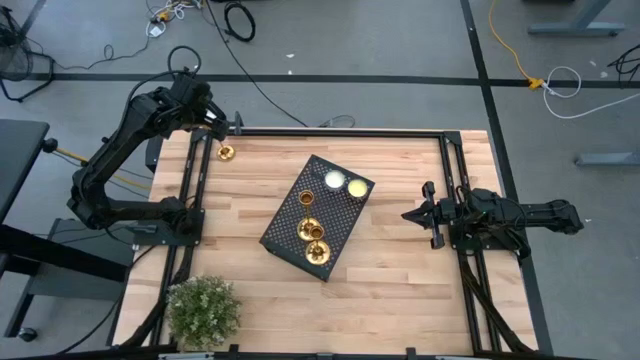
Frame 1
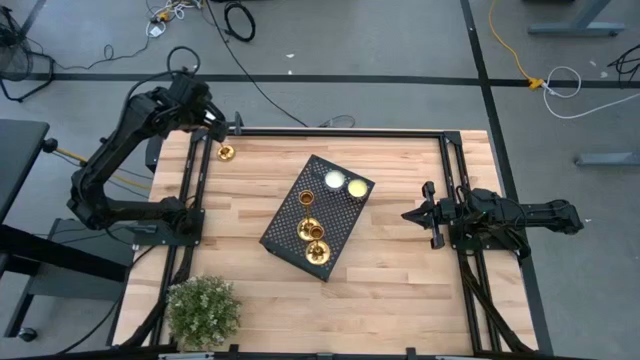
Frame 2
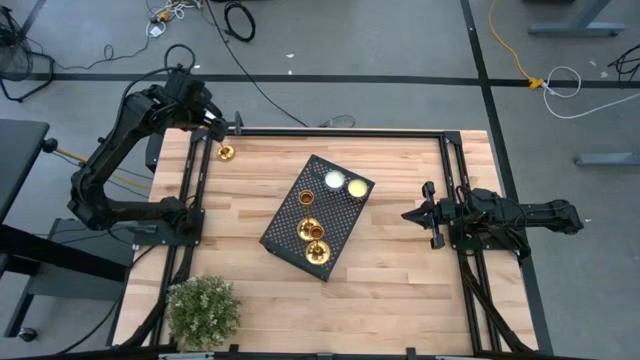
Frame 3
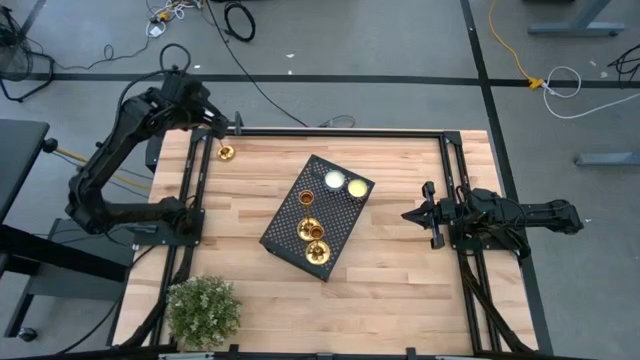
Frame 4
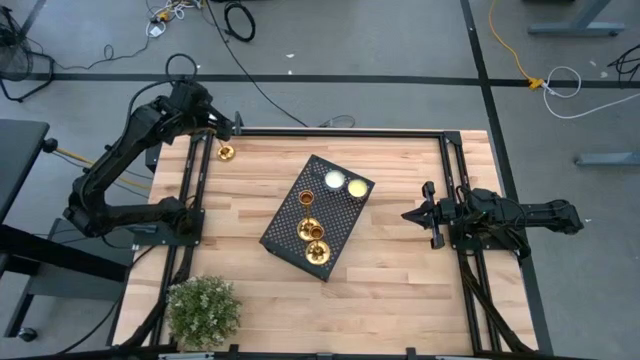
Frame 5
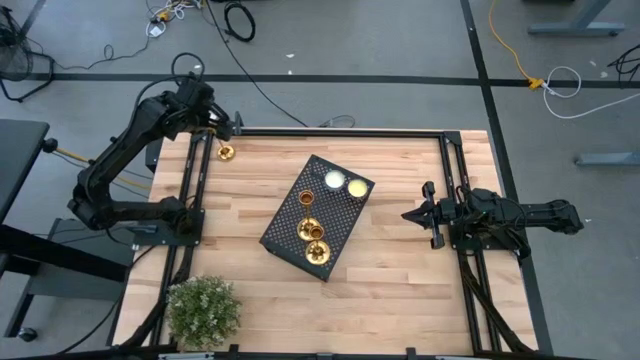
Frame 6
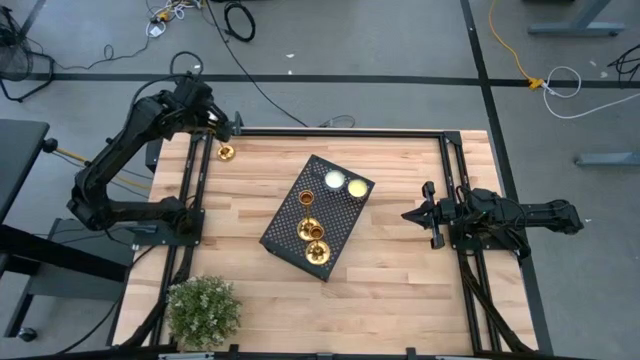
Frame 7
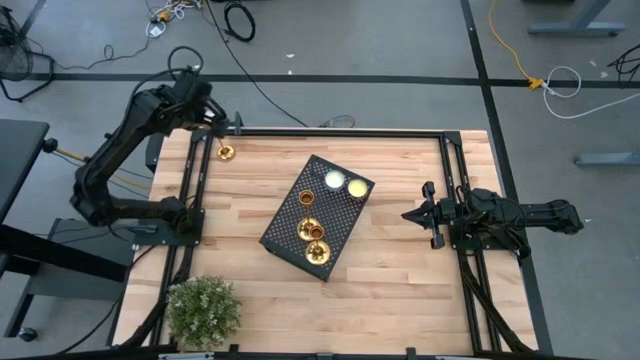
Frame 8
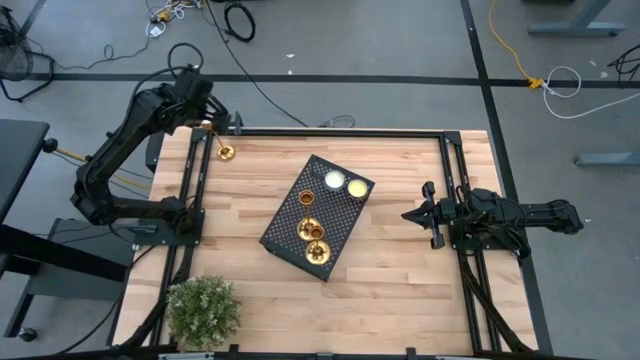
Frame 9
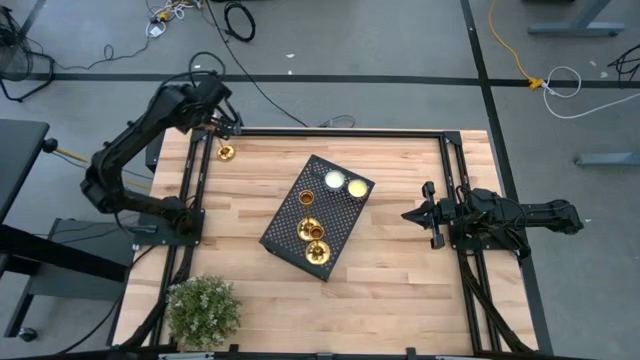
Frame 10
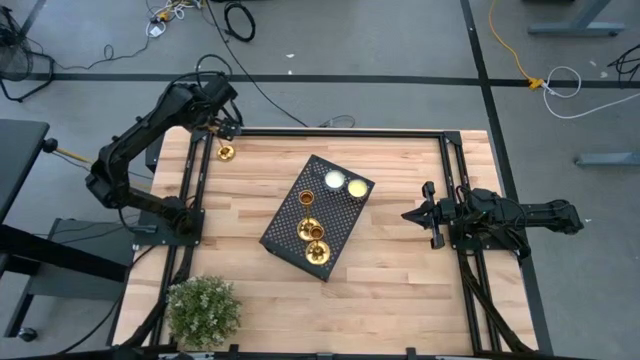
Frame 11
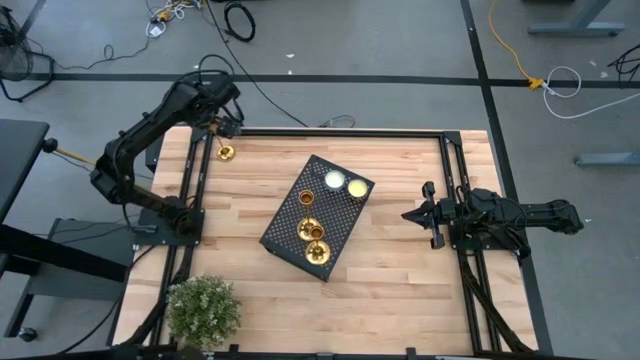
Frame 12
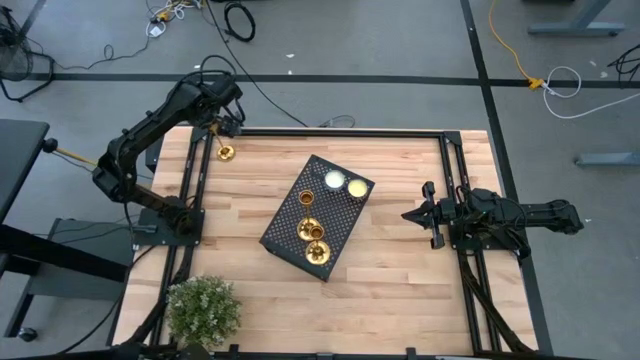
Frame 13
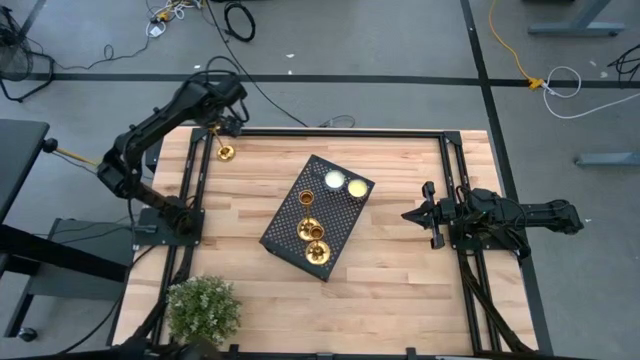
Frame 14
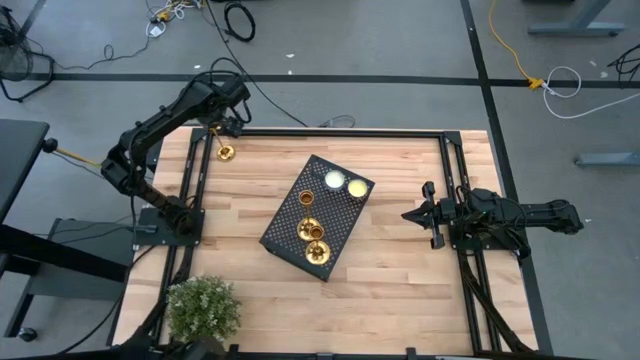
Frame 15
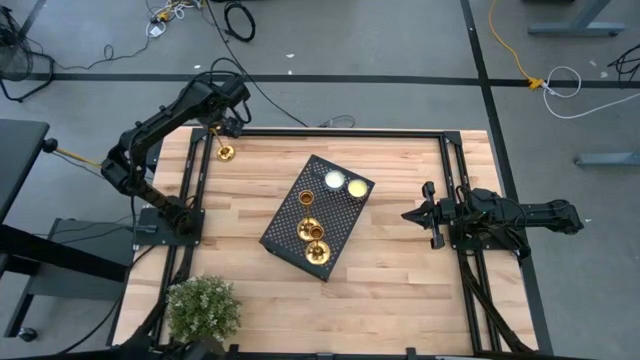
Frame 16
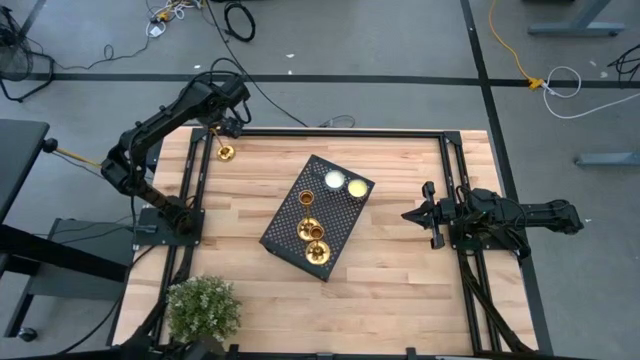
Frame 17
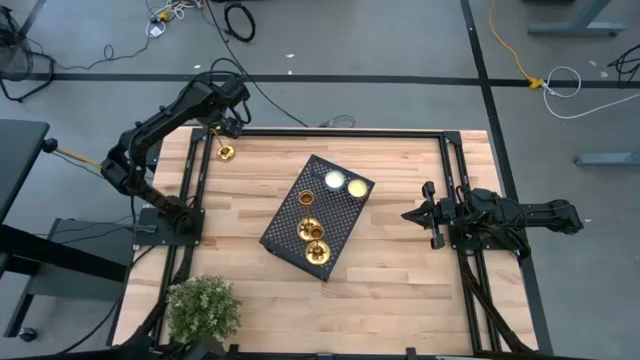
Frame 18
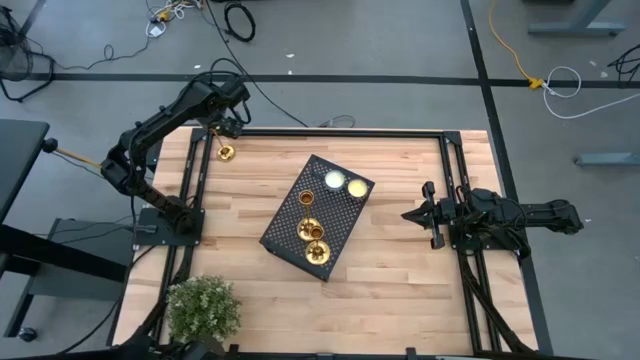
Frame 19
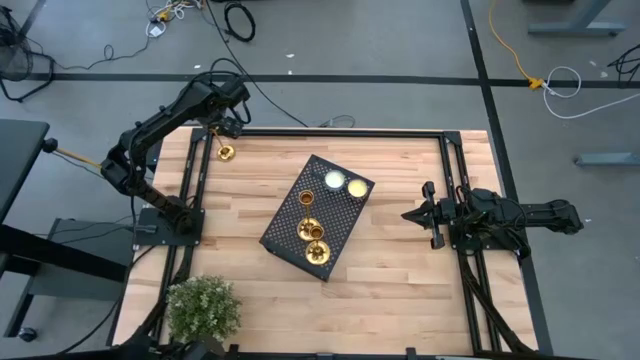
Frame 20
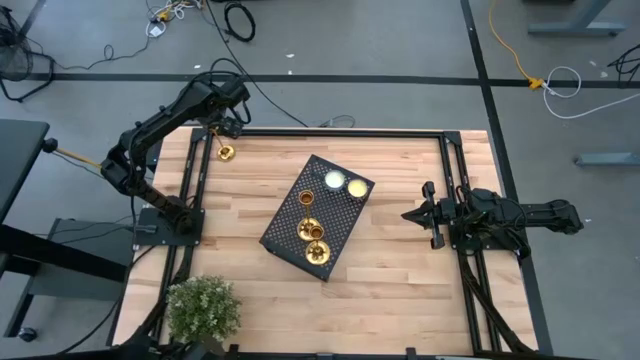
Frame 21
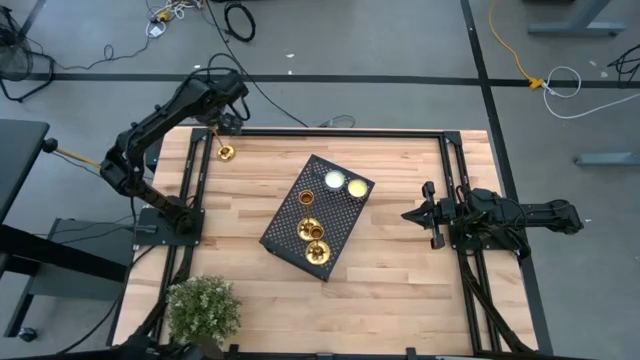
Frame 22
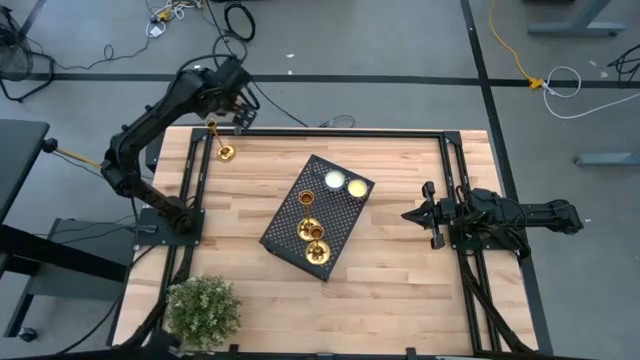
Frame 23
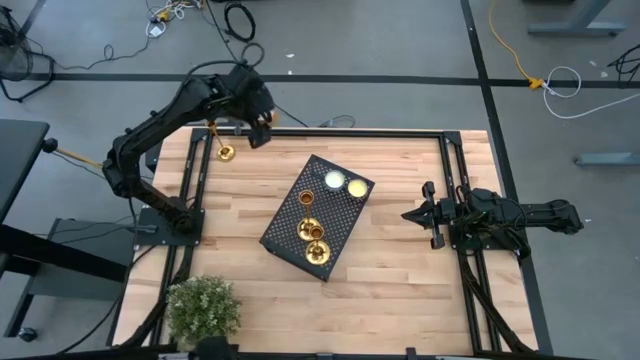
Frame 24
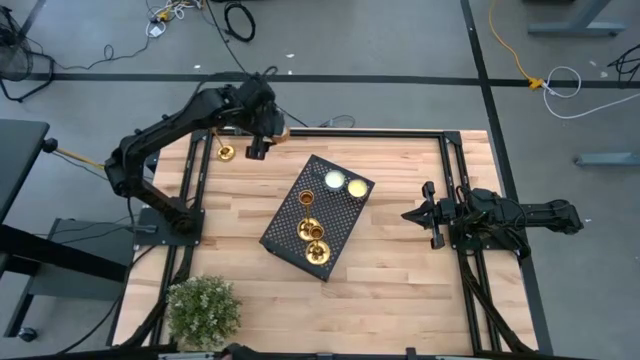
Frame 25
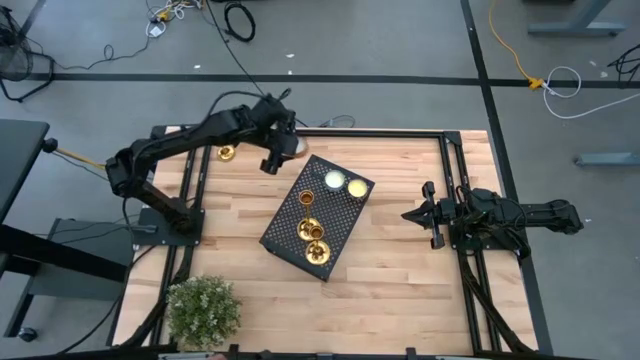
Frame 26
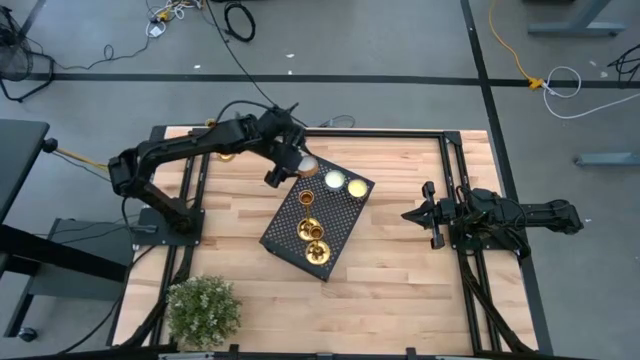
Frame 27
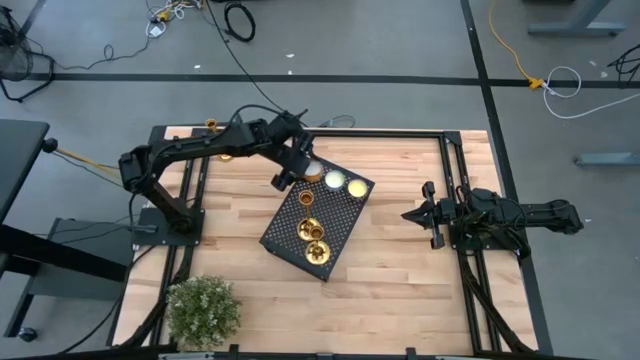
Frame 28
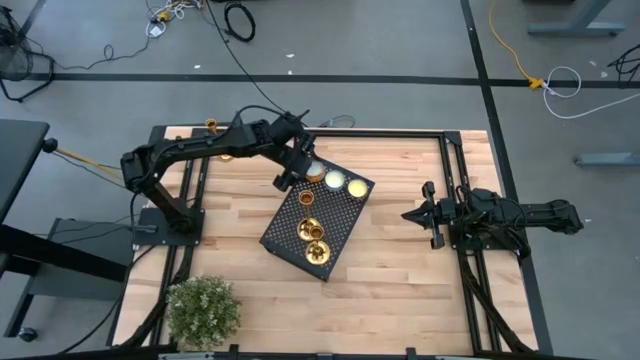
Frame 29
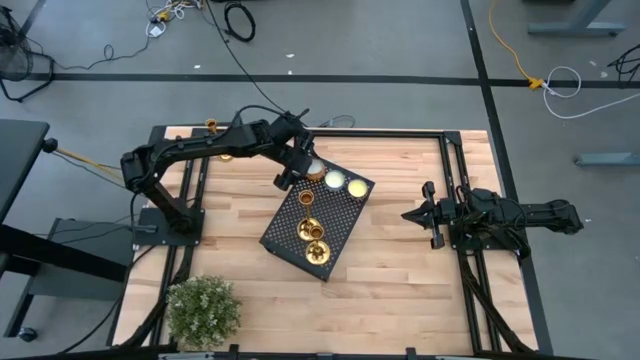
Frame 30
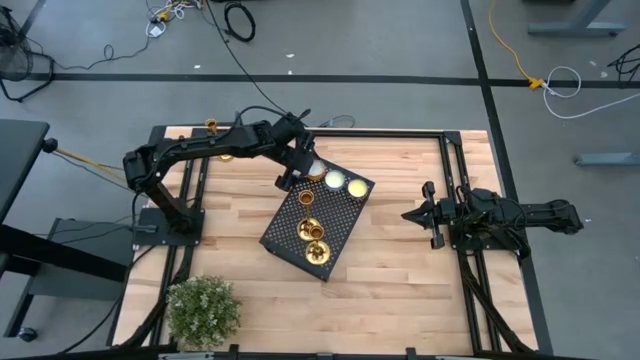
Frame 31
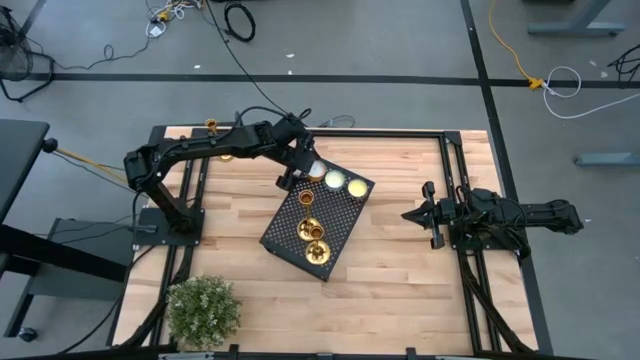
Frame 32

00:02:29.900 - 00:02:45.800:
Task: Stock candles on shelf
Put the orange scented candle on the shelf

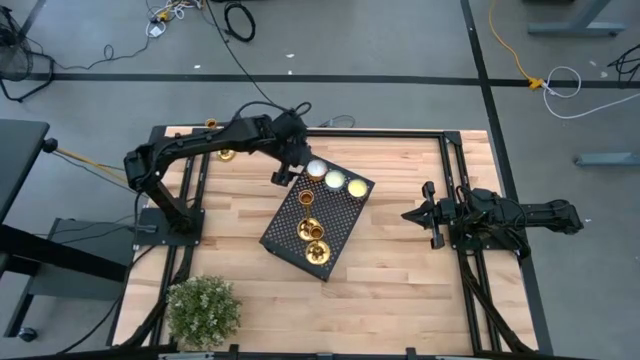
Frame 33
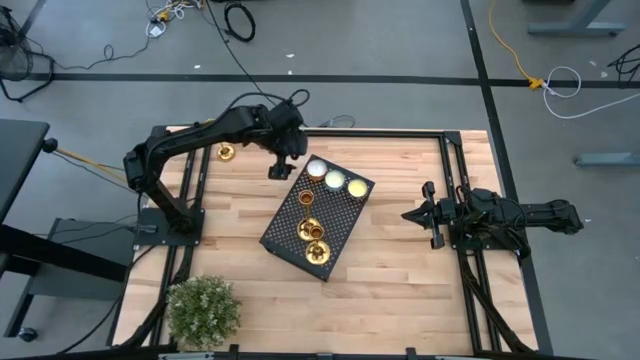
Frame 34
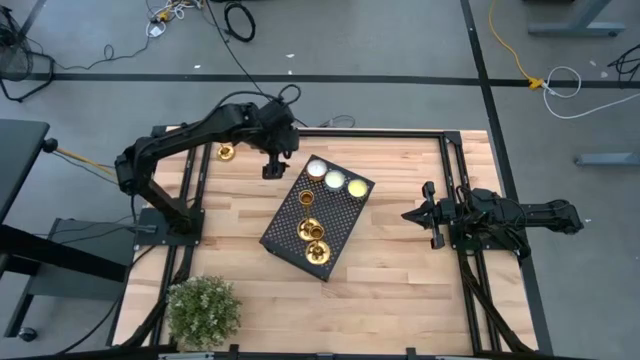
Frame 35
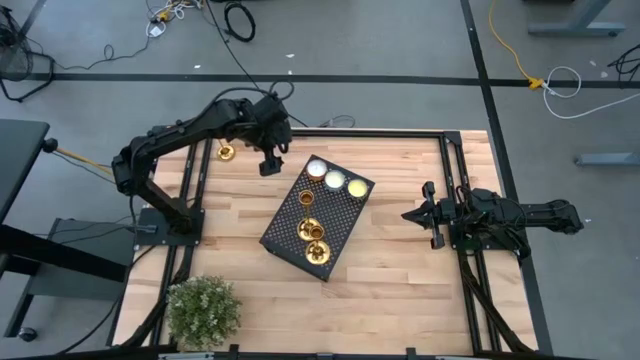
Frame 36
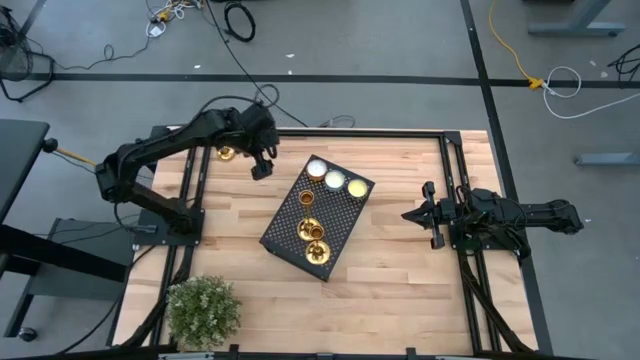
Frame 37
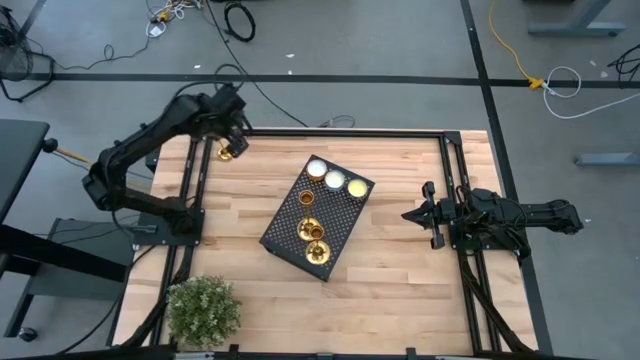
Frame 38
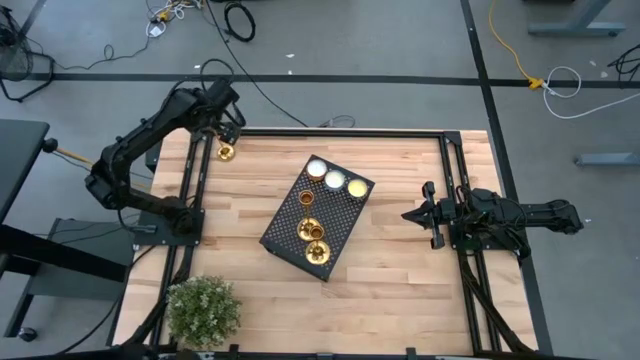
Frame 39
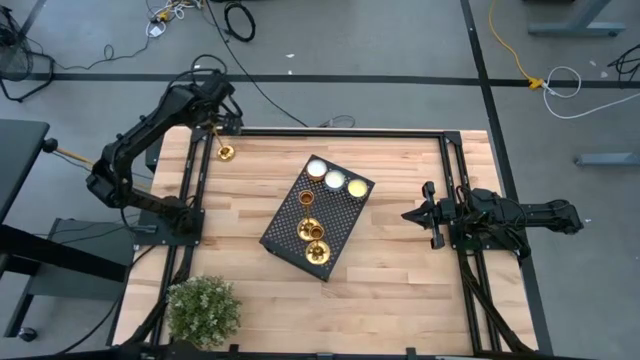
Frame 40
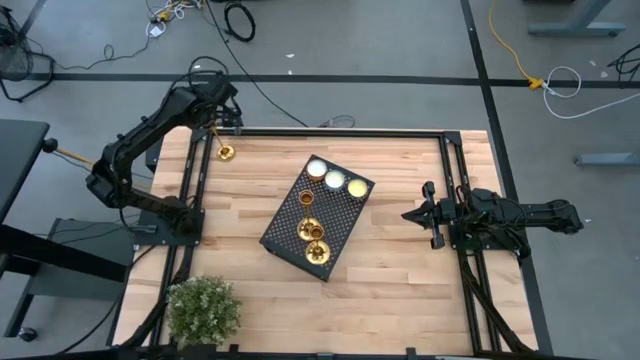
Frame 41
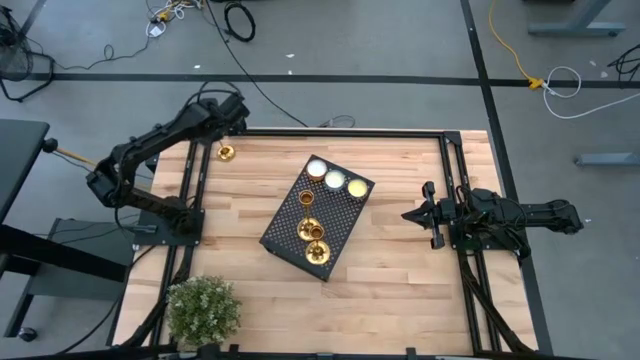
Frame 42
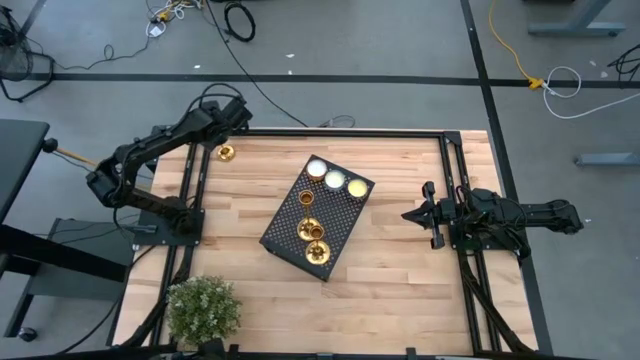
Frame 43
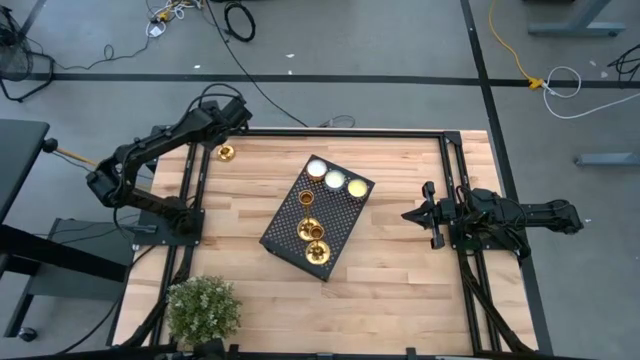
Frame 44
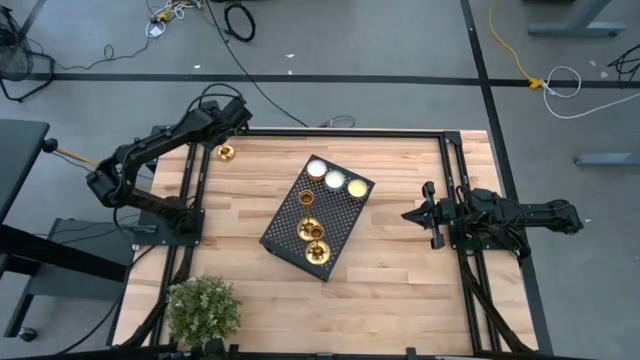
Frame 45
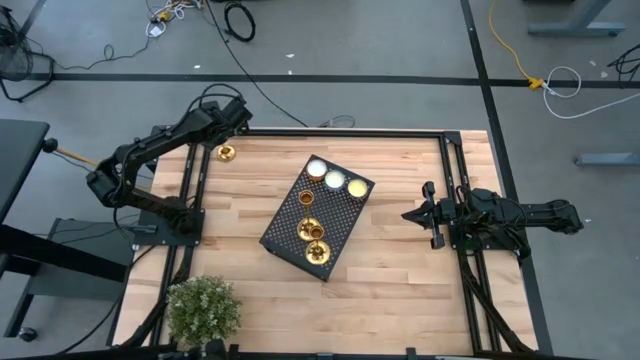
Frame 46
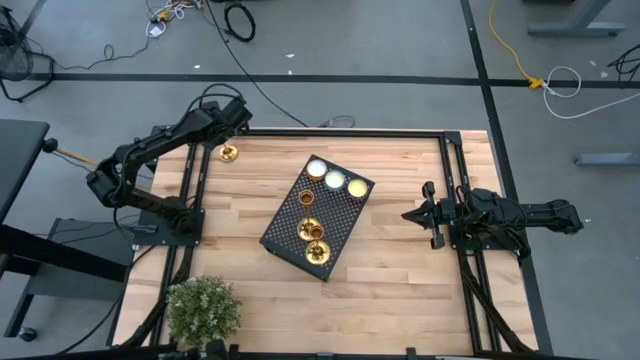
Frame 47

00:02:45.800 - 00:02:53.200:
Put the gold candle holder on the shelf
